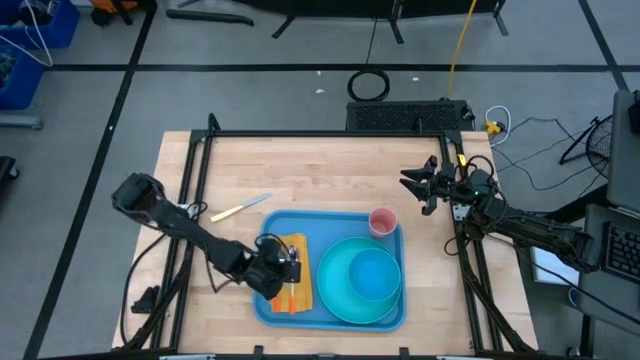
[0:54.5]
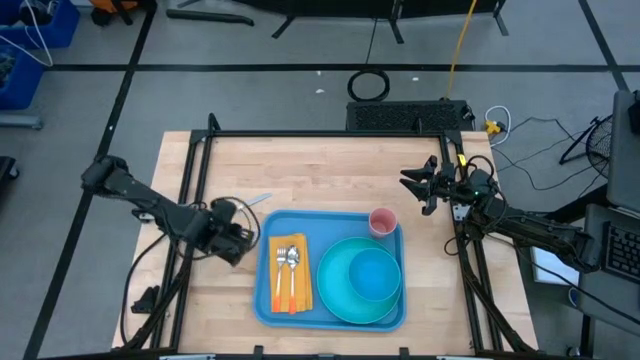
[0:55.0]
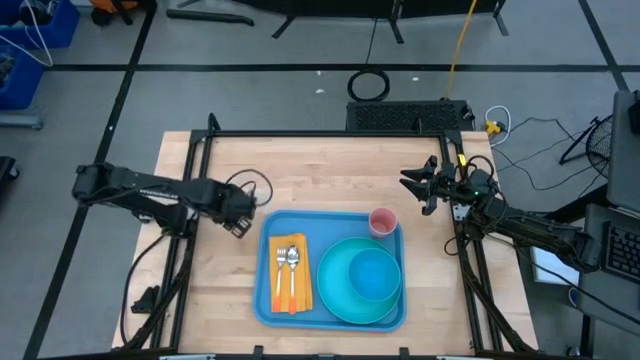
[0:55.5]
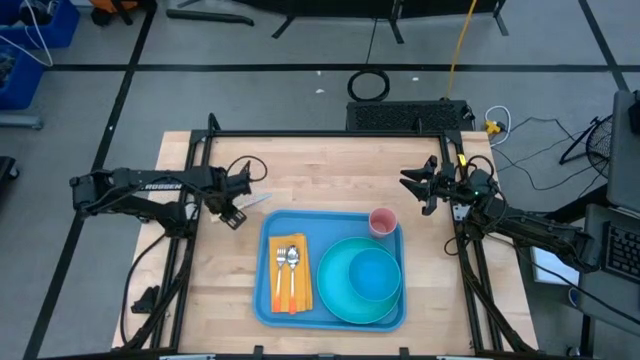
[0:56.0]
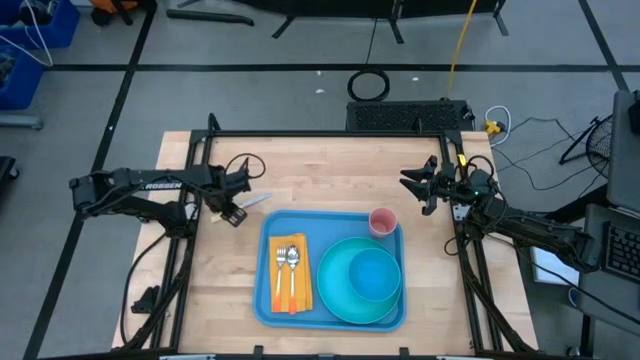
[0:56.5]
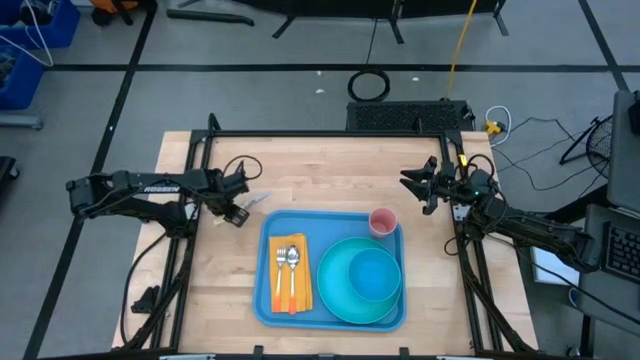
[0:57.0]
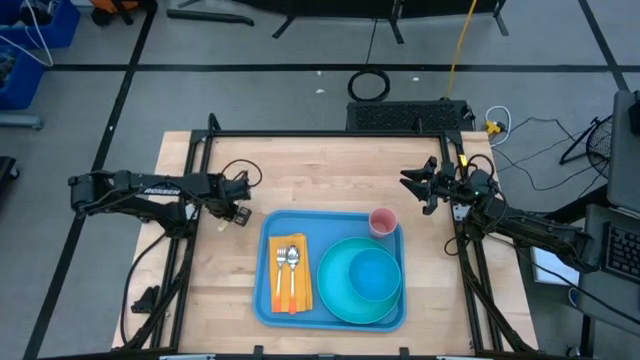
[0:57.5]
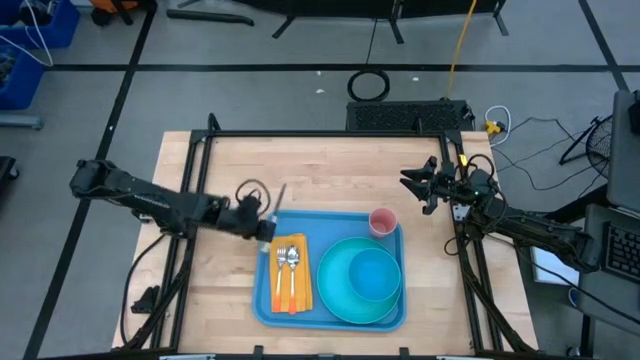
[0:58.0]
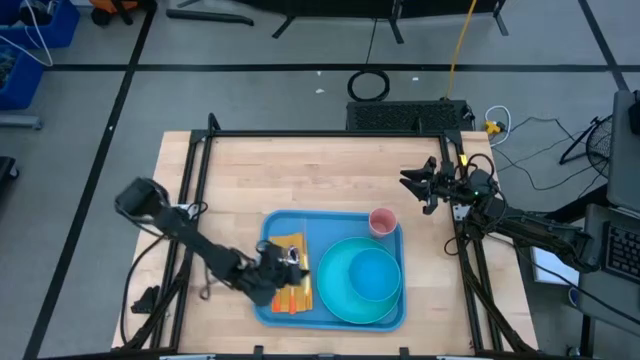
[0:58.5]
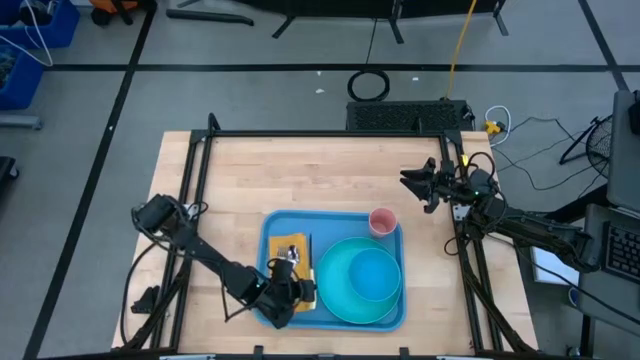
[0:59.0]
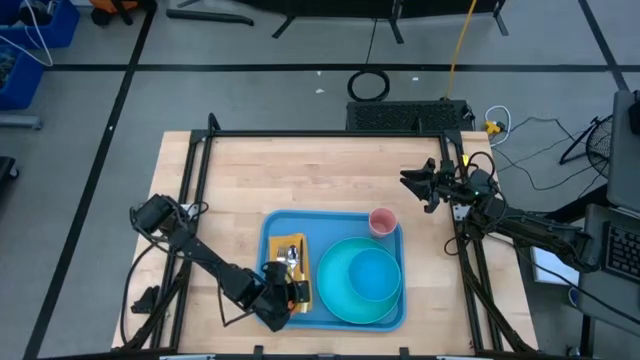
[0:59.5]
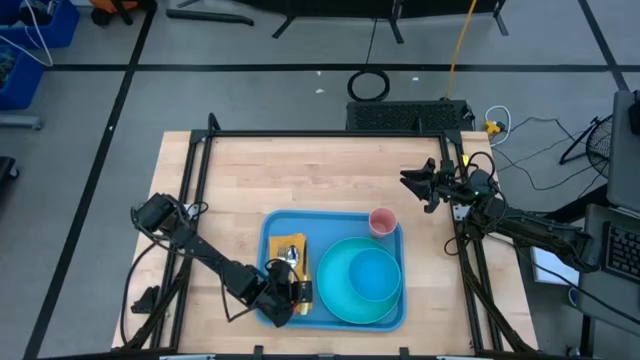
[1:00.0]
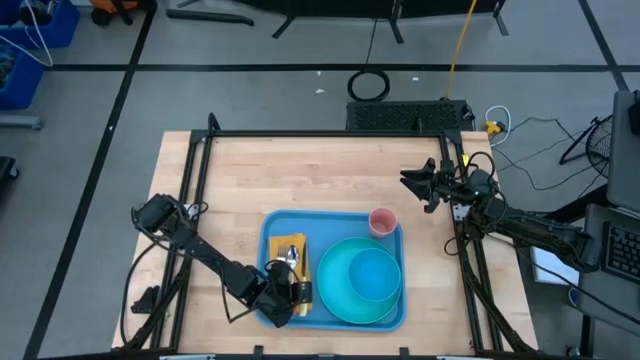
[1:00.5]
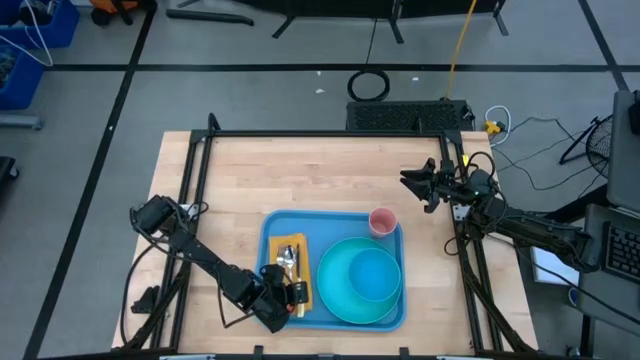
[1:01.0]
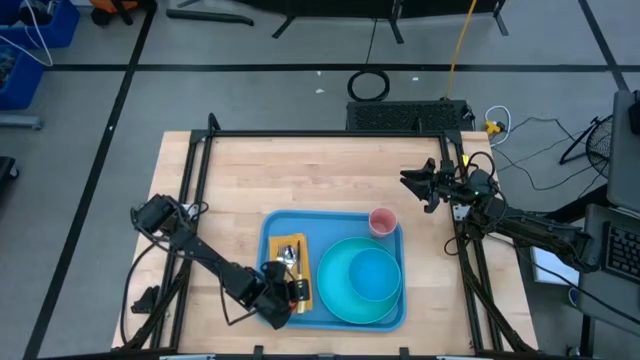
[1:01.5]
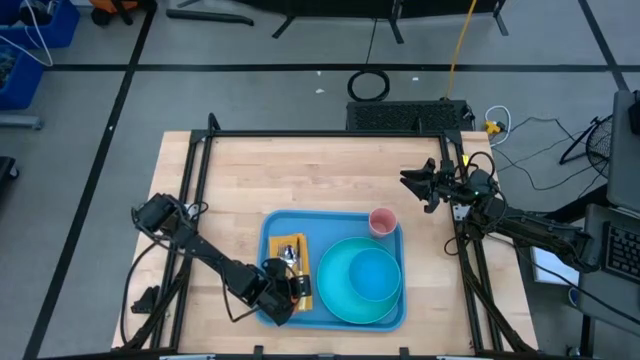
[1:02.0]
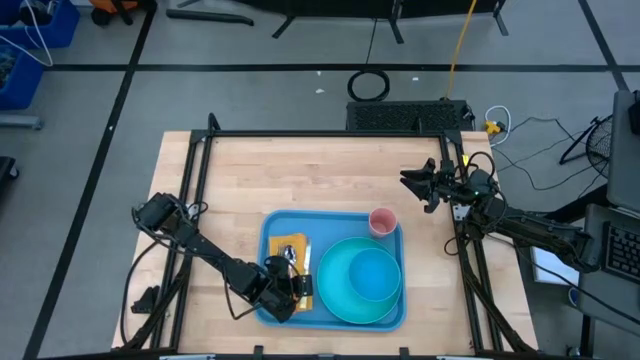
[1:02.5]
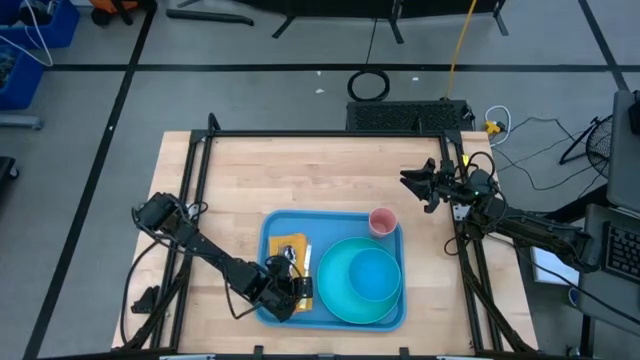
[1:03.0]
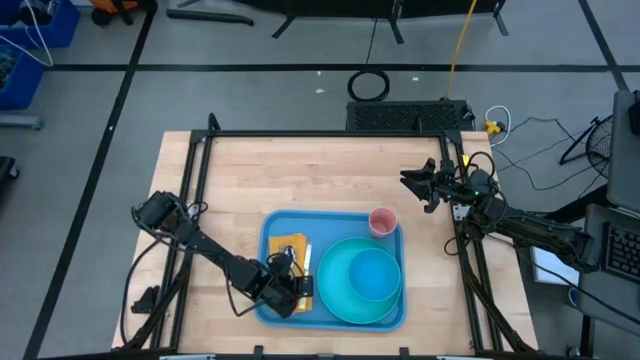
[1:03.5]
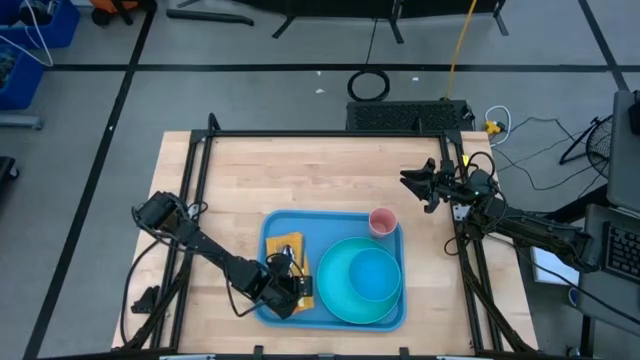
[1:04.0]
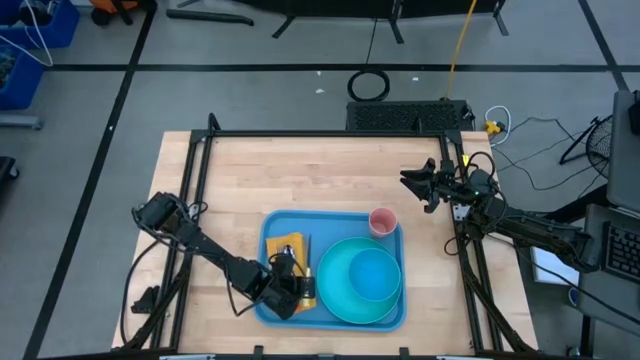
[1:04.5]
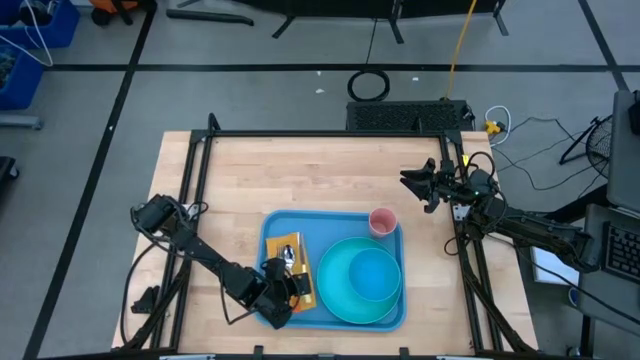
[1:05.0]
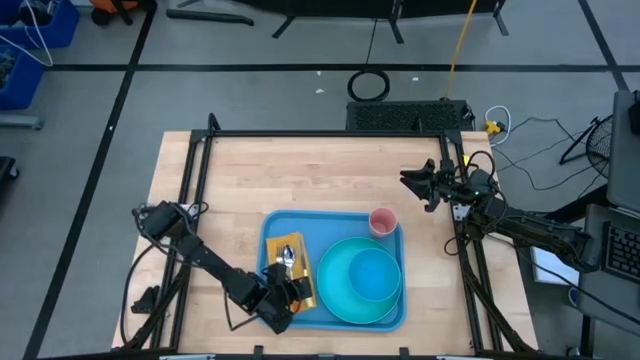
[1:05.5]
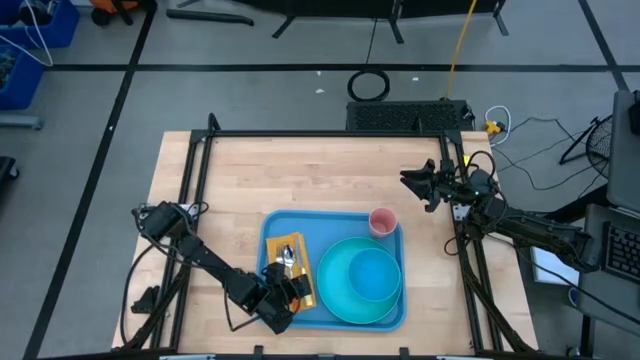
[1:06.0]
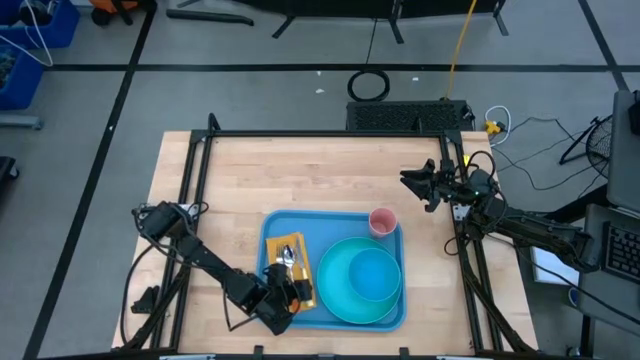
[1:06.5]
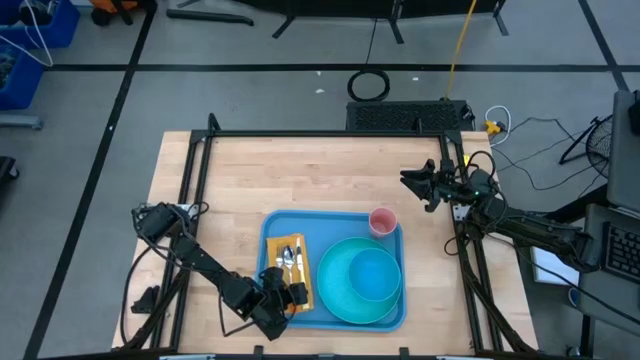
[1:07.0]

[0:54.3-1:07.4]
Task: Set up tray
Put the yellow knife on the yellow napkin to the right of the orange fork on the blue tray

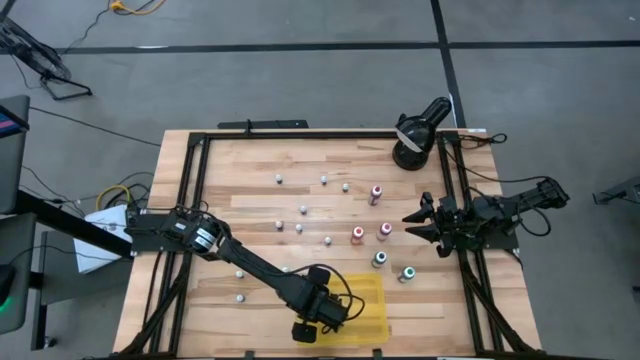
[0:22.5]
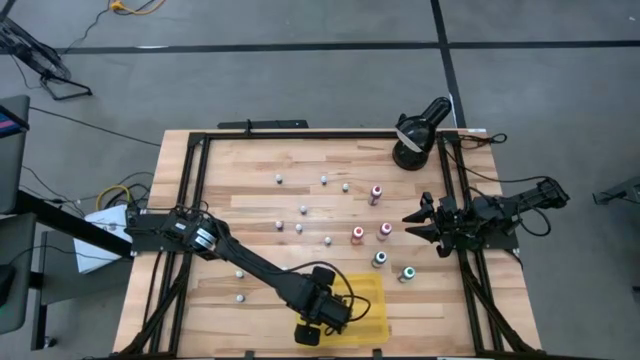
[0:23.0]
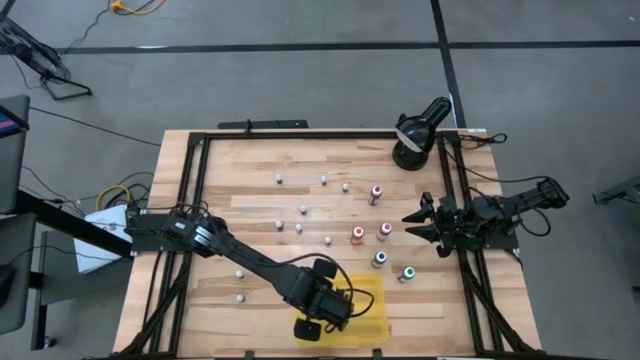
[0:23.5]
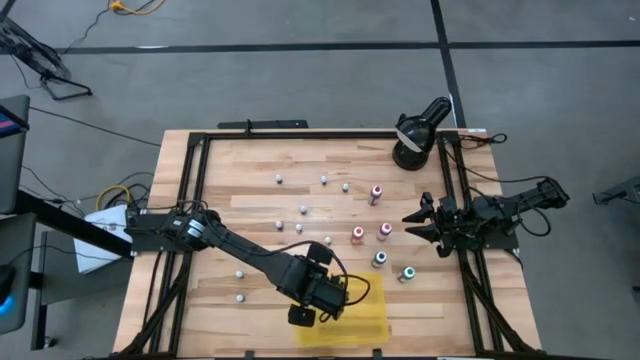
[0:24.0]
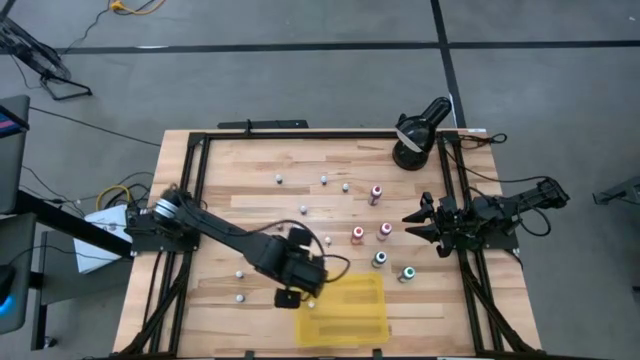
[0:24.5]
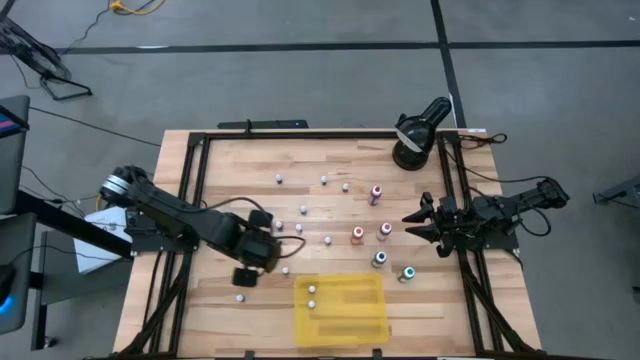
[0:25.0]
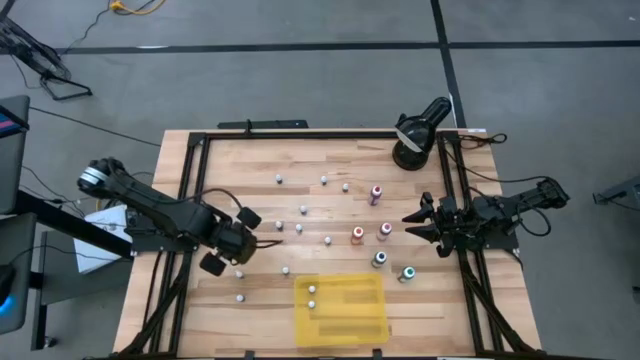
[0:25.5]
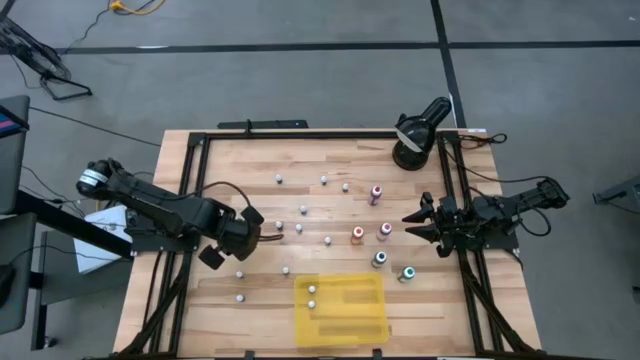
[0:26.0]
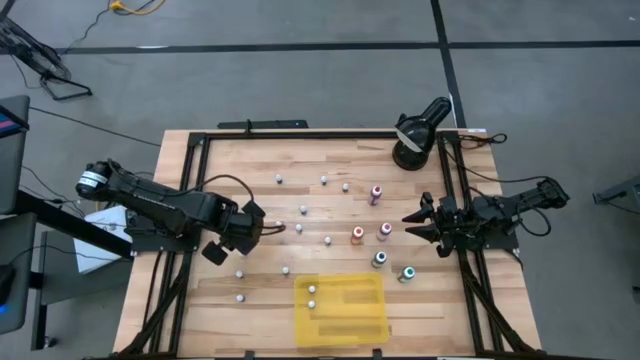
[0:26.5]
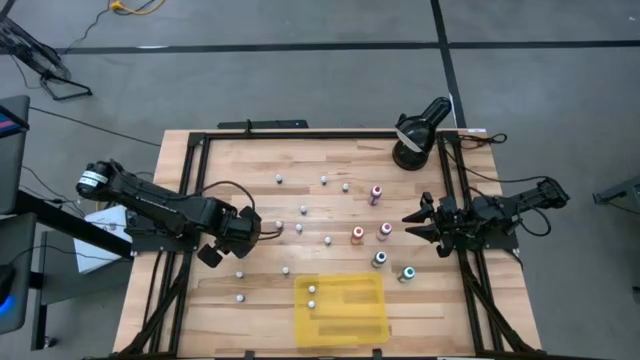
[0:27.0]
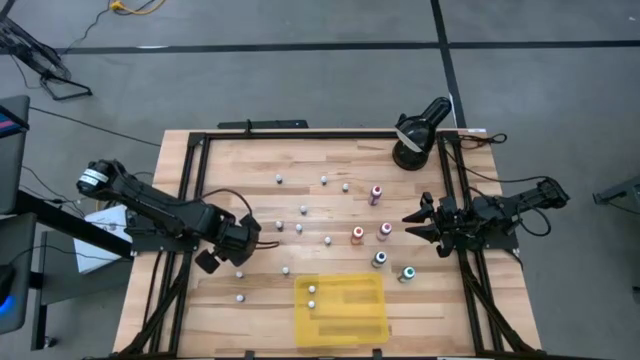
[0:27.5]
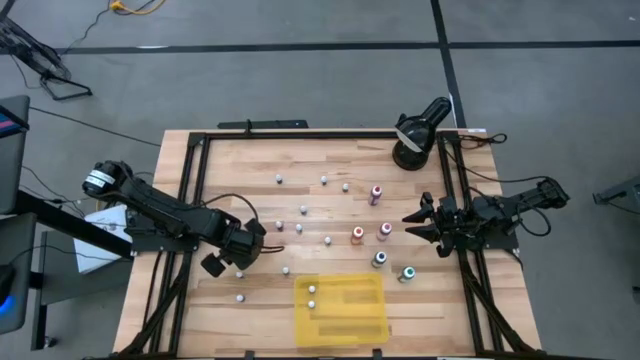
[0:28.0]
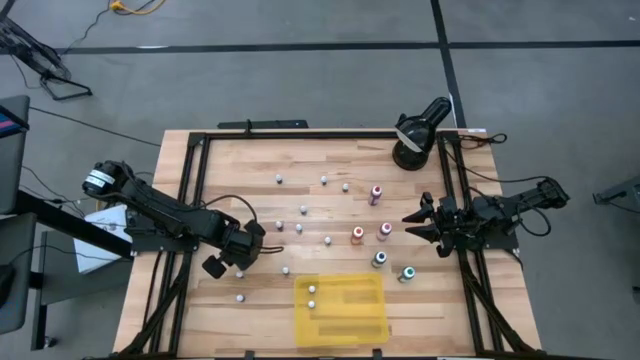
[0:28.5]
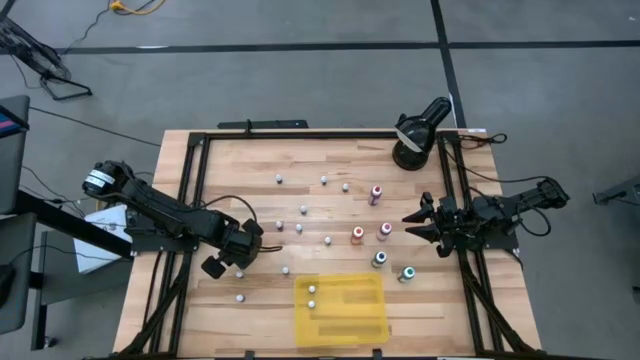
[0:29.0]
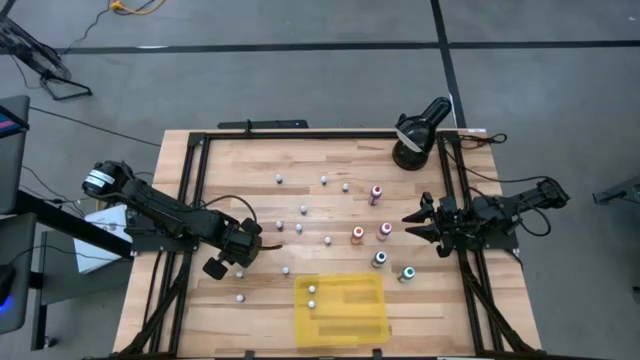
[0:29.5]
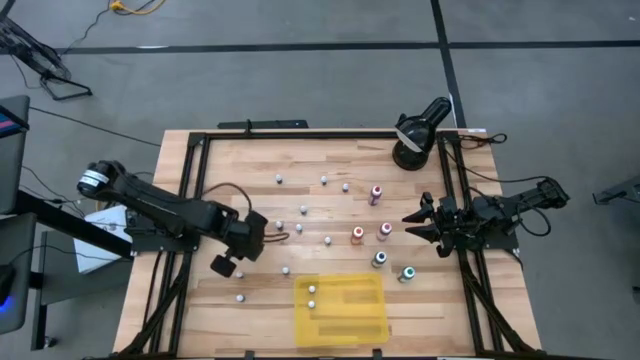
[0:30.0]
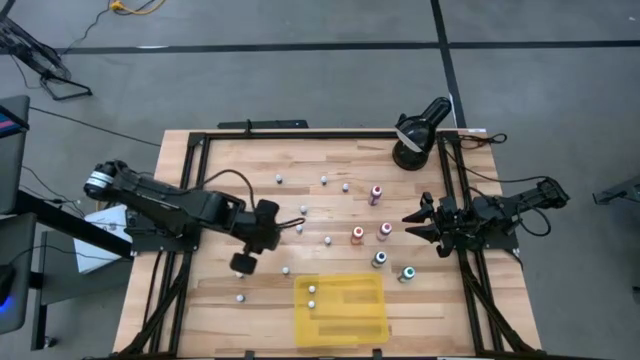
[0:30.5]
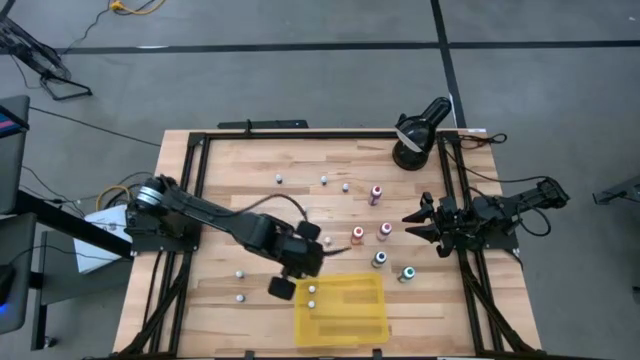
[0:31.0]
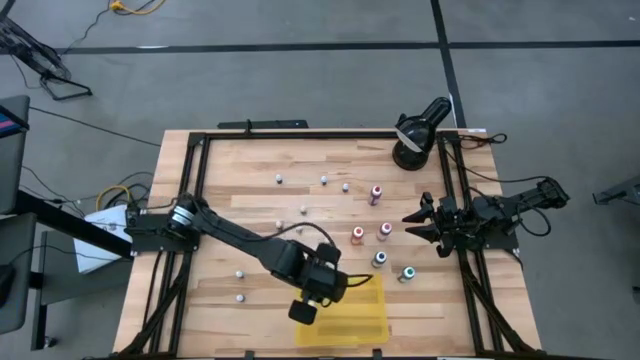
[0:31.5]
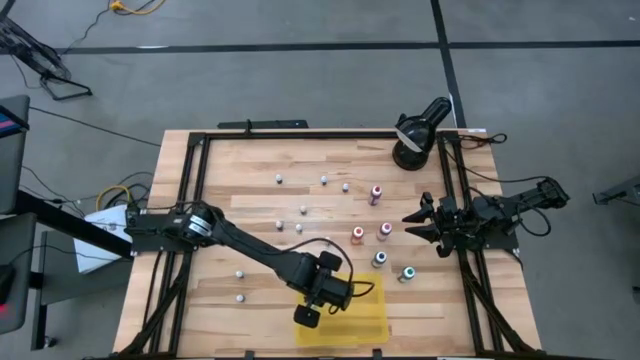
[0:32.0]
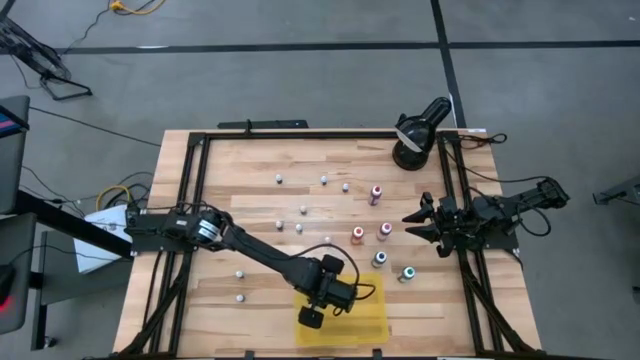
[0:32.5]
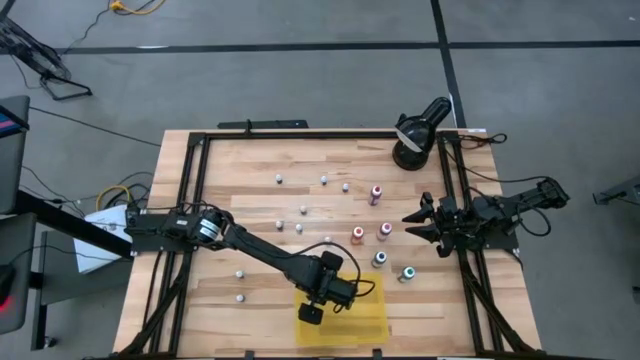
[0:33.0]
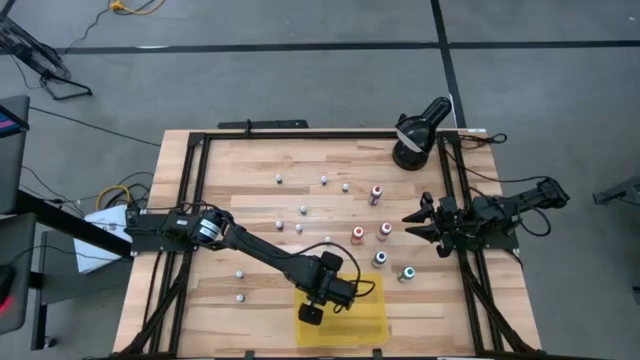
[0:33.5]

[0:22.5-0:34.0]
Task: Pick & Place food coloring
Put the small purple food coloring bottle in the yellow bin
